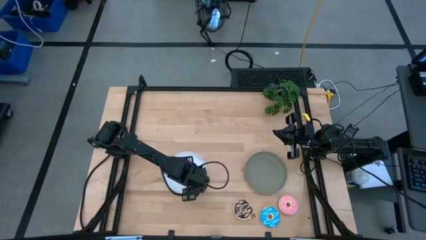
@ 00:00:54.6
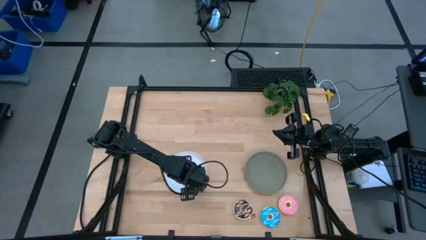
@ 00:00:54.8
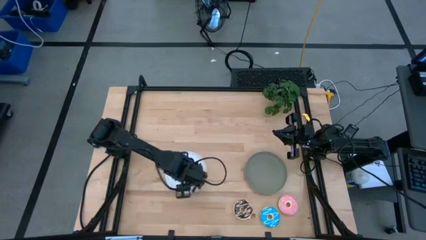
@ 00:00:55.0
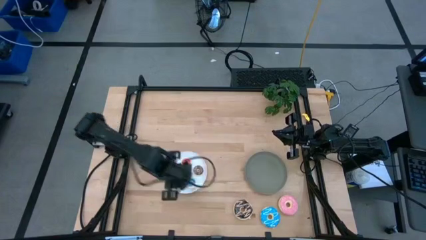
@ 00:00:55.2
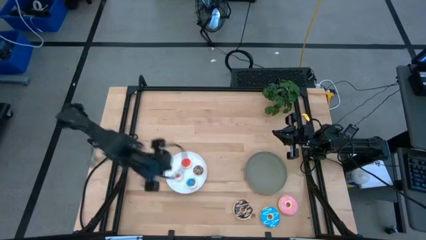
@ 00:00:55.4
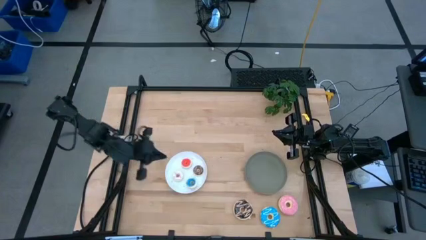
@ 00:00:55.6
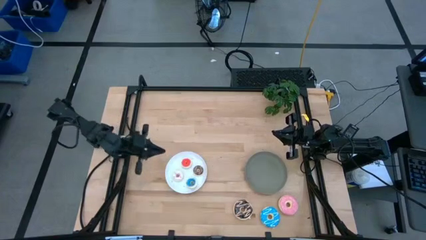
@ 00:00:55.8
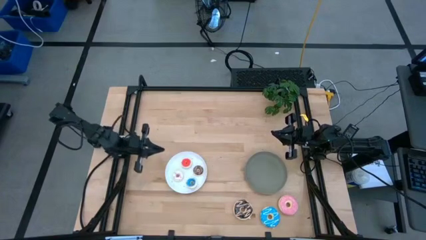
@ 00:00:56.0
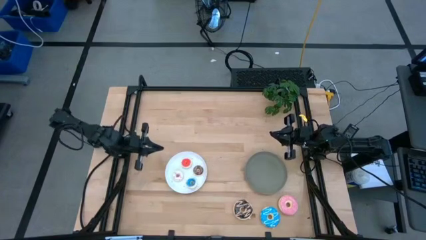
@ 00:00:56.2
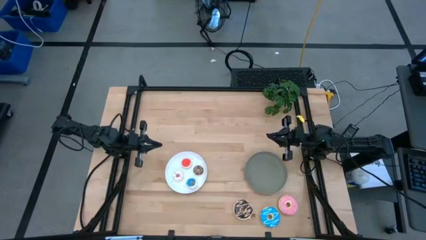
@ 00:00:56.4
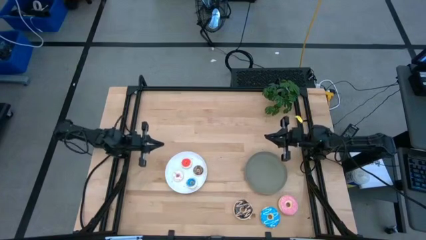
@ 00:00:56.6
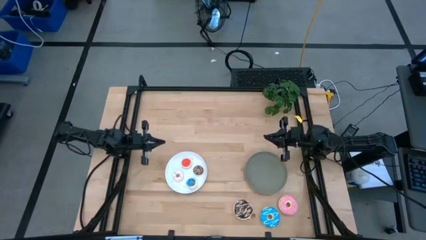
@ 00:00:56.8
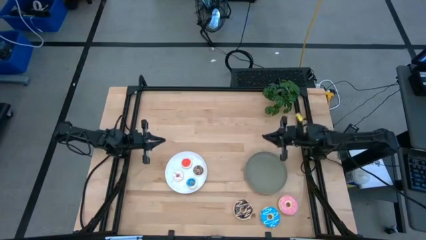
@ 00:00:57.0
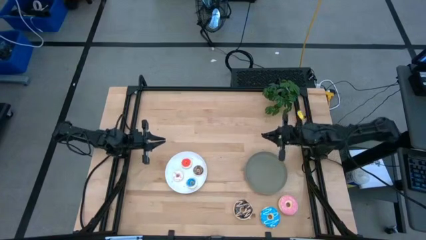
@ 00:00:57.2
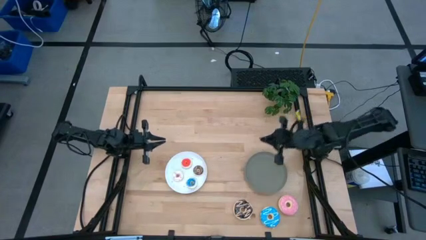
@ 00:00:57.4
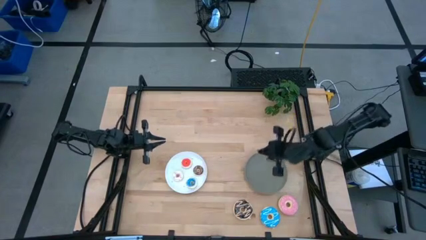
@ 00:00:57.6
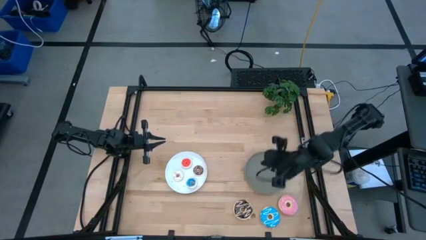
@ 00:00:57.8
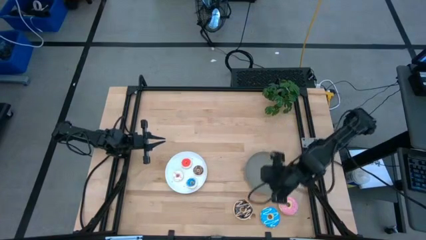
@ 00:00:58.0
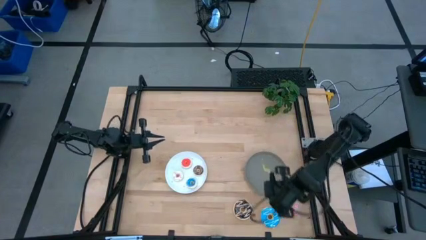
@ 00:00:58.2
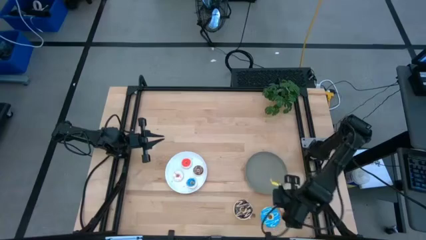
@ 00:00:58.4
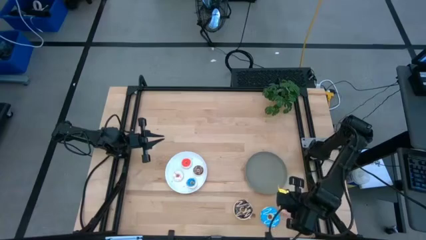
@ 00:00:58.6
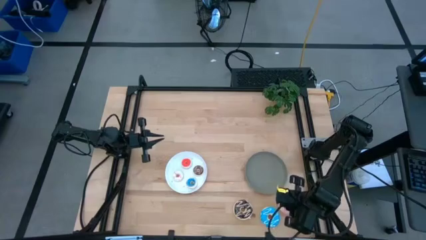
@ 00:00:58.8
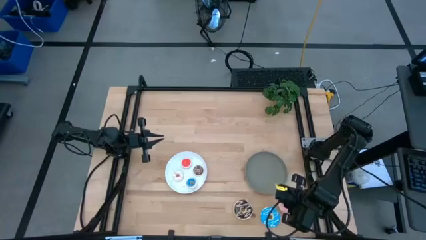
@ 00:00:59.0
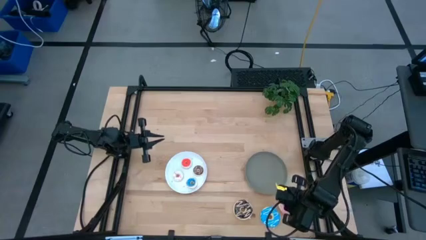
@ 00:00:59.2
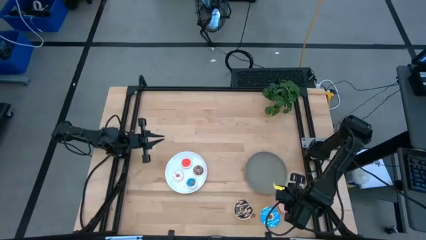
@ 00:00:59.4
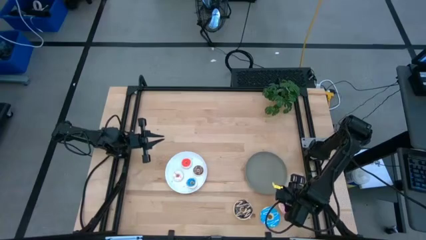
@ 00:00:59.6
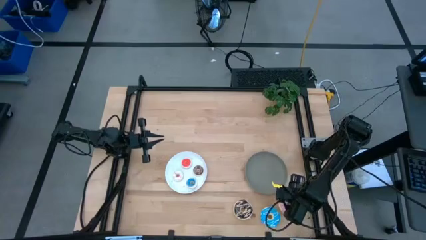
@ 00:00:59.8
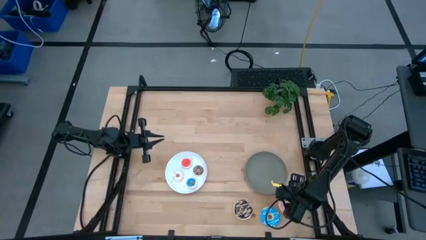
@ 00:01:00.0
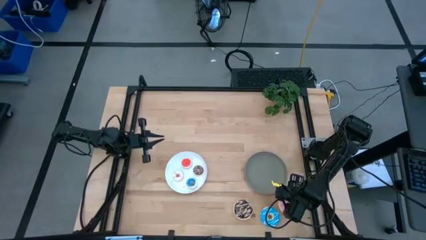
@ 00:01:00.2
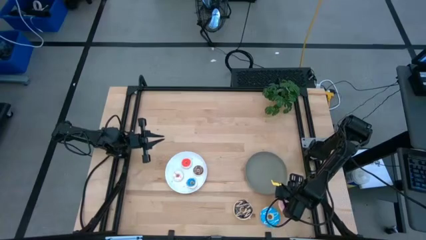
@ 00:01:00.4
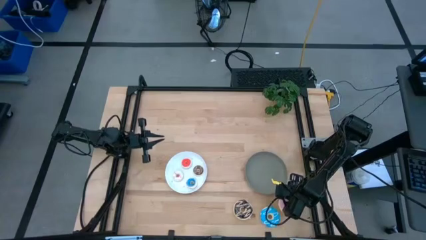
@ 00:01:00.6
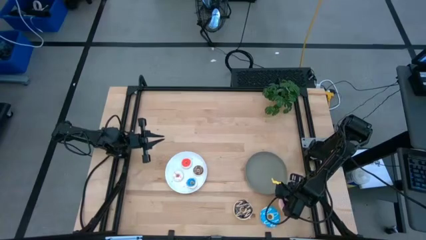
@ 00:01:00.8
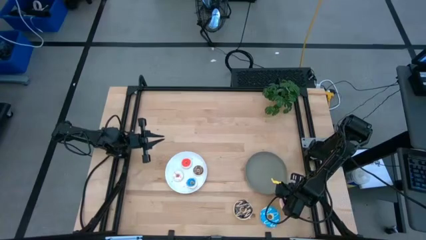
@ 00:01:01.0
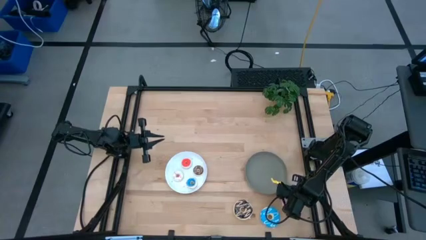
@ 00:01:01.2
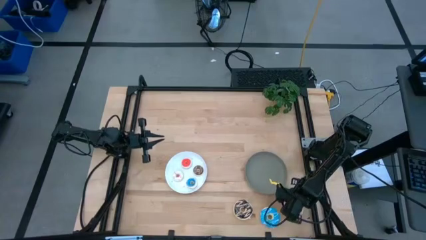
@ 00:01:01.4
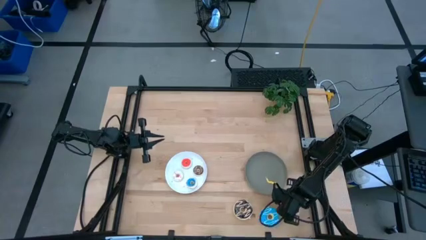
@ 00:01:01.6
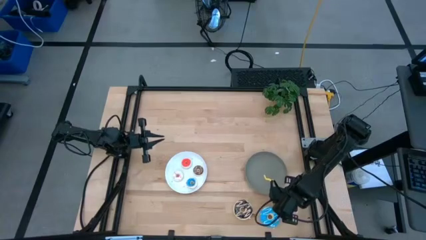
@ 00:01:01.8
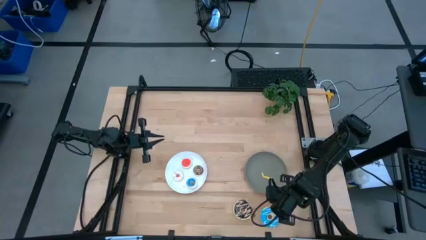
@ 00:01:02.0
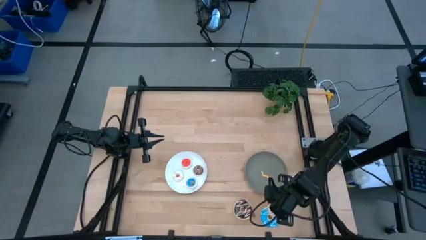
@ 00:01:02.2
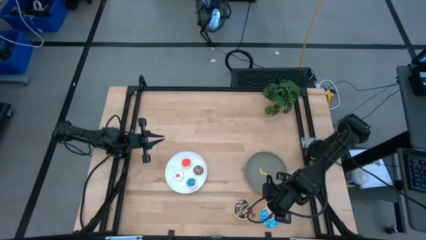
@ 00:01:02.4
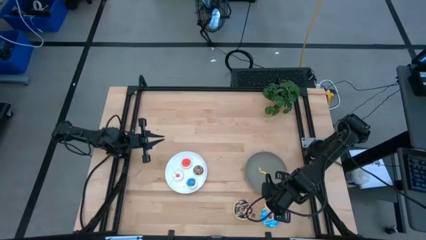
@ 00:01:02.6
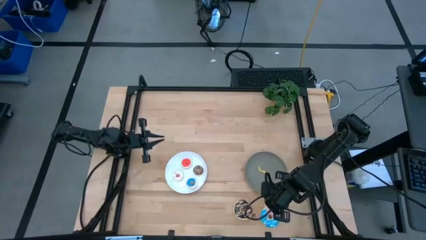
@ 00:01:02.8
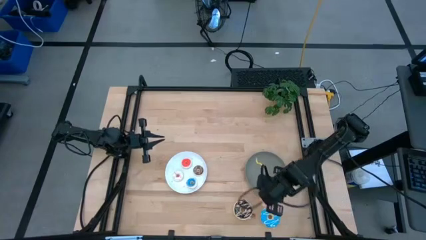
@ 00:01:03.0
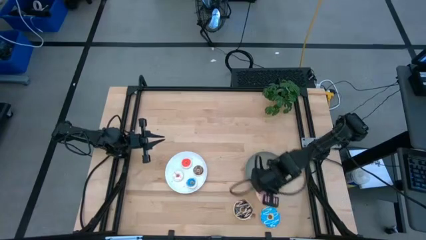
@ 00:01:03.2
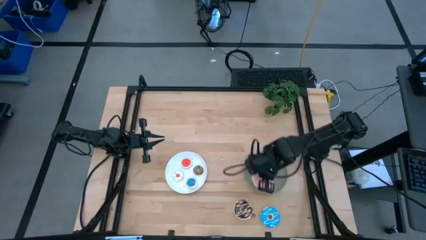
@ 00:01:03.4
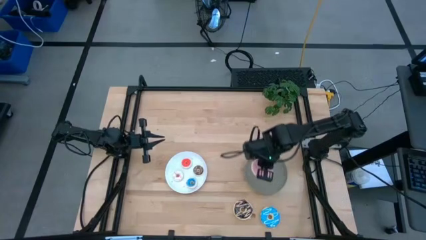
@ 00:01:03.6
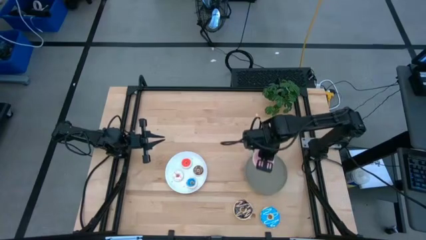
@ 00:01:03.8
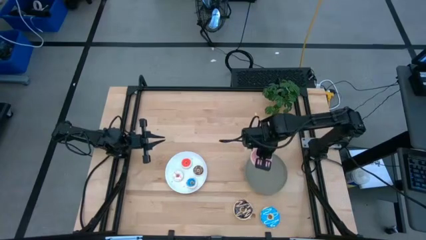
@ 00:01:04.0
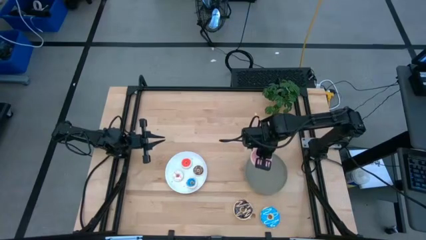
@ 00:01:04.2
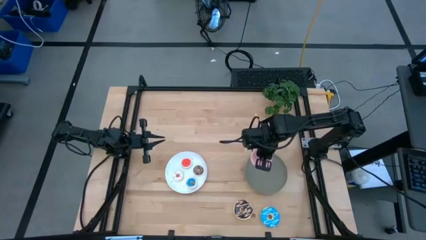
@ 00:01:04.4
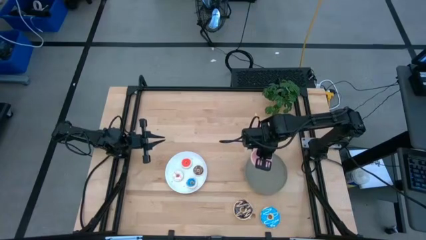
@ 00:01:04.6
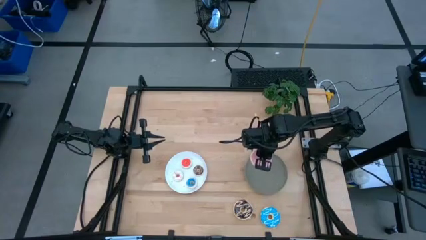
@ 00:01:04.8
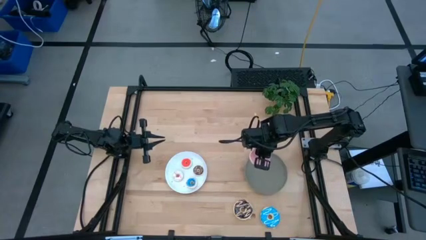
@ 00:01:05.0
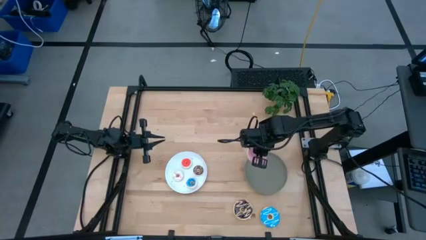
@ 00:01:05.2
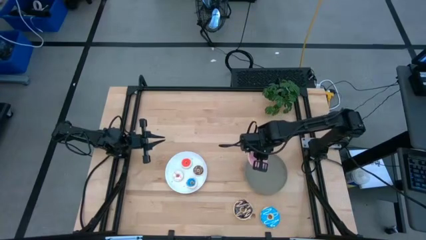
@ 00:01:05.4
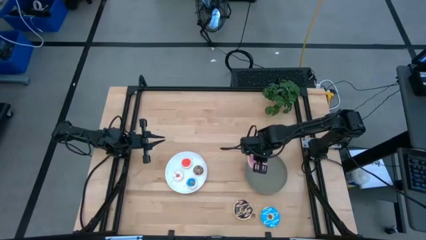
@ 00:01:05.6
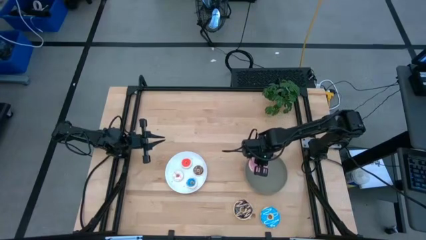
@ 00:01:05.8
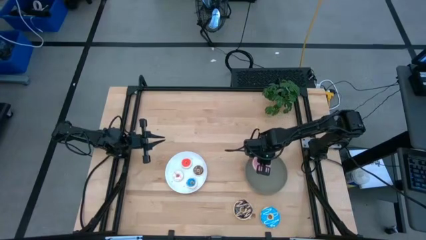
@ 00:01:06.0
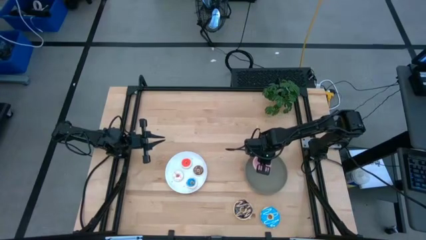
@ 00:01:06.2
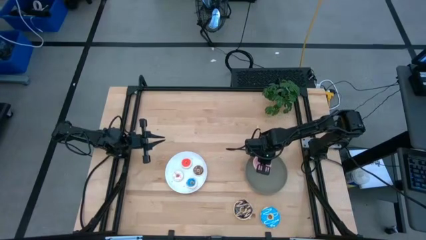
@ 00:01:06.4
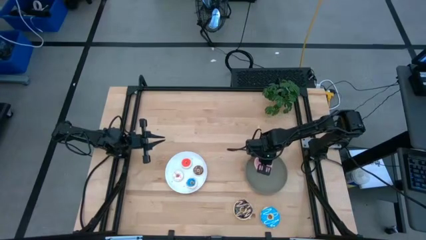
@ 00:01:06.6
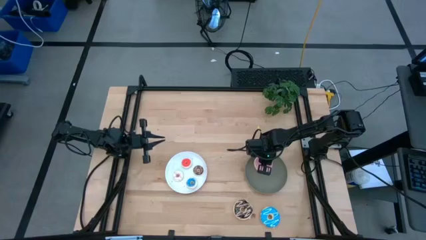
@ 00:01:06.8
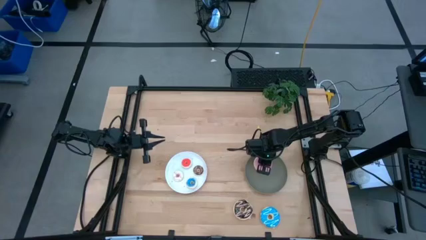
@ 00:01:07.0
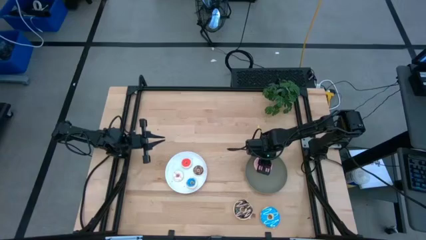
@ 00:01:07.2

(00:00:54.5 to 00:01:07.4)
Task: Pick & Place donuts
Put the large pink donut on the gray plate

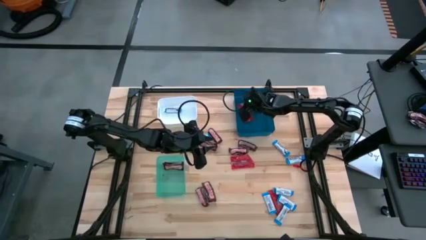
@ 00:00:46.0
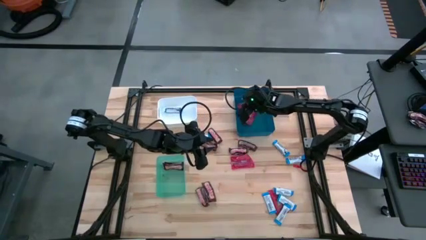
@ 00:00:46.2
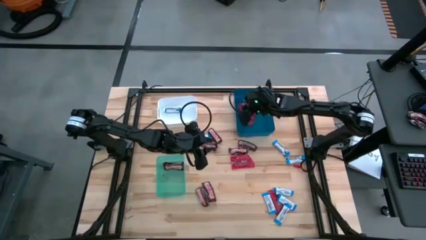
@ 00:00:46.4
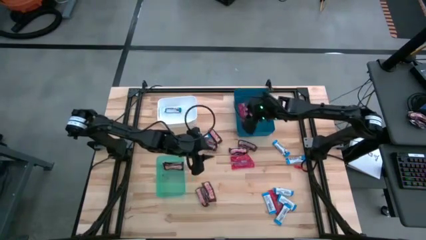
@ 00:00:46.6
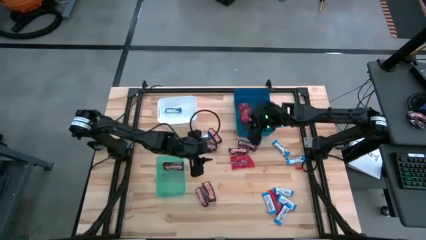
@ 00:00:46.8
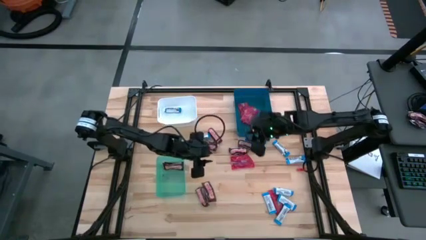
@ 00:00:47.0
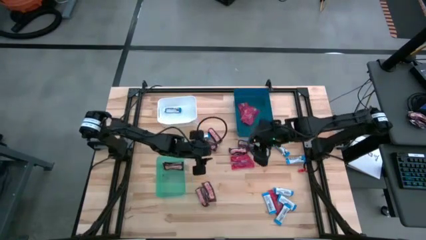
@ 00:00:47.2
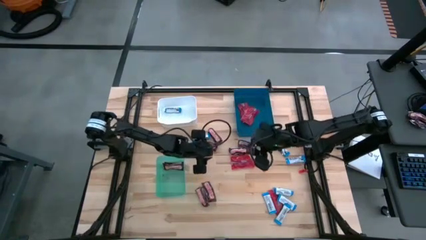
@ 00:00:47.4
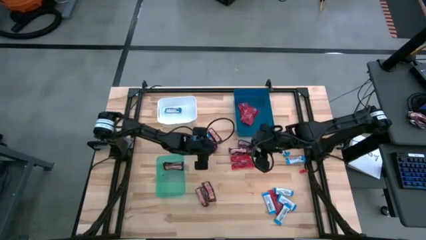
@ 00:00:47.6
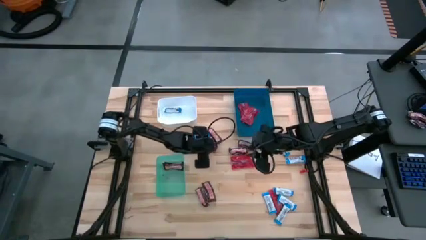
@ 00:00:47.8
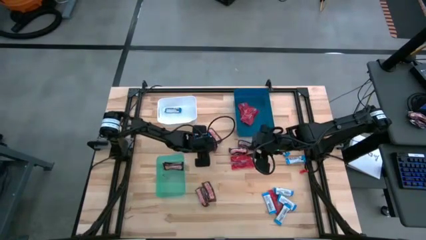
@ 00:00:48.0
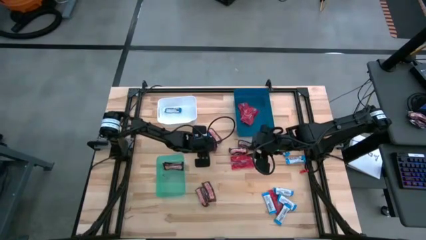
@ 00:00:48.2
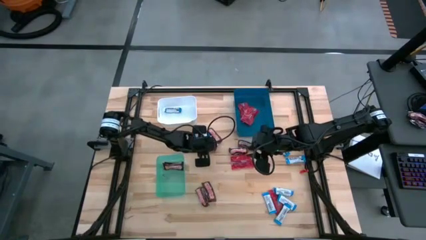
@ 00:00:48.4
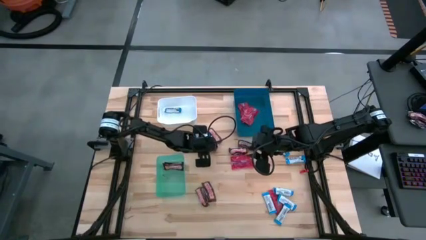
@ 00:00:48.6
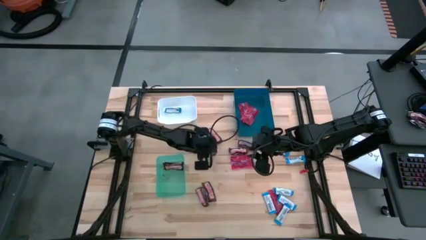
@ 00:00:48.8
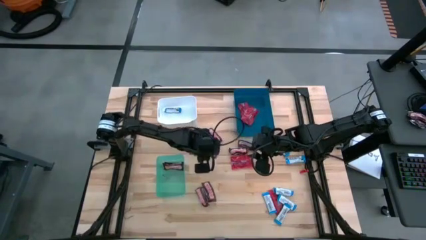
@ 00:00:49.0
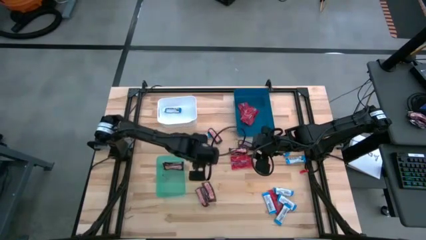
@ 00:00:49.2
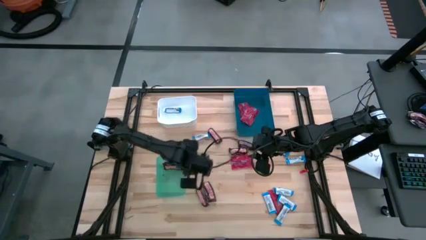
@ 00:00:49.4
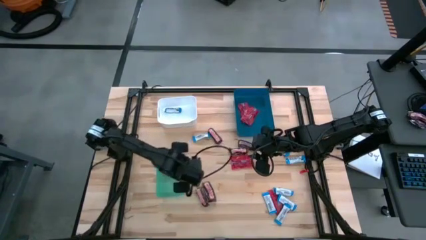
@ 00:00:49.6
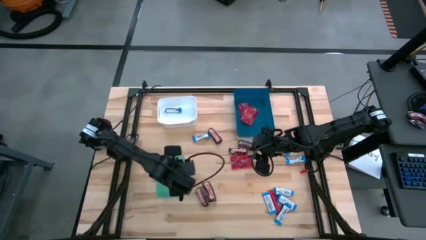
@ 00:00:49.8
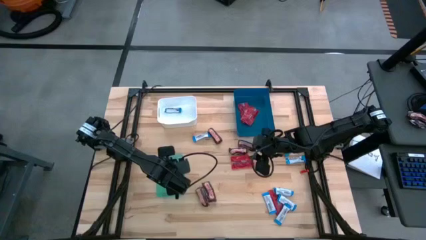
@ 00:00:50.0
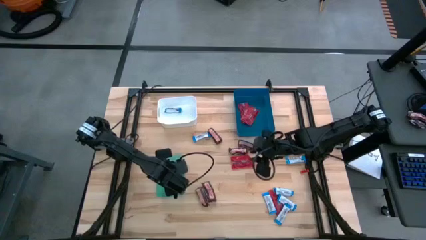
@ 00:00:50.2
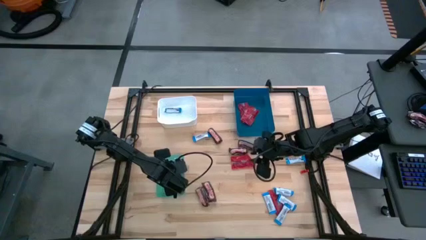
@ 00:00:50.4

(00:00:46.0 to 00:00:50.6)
Task: Sort candy
Put the brown chocolate bar into the green bin
